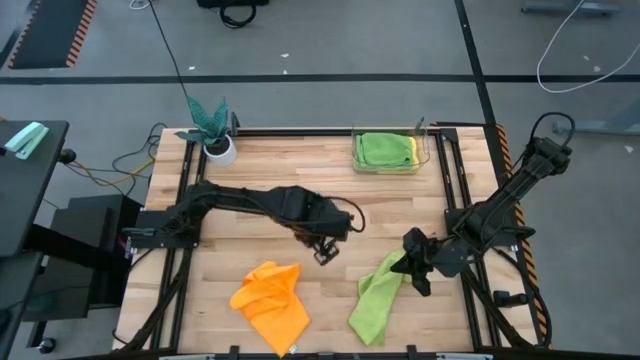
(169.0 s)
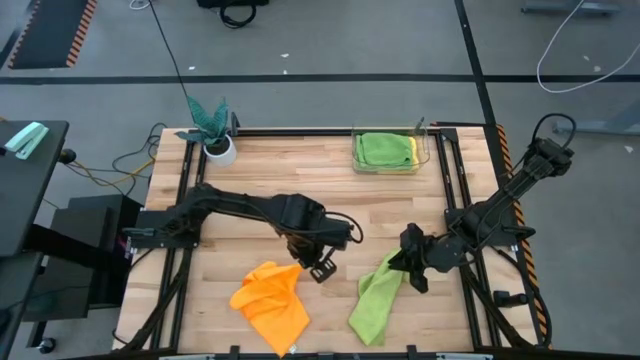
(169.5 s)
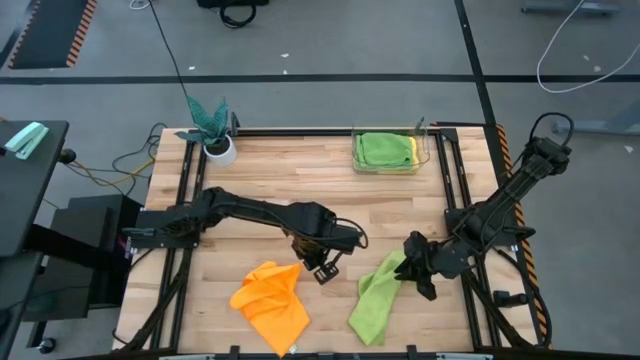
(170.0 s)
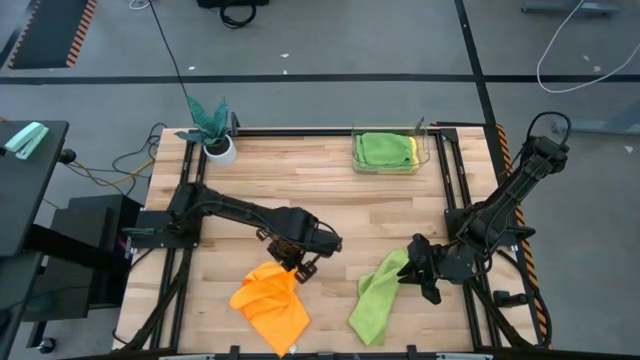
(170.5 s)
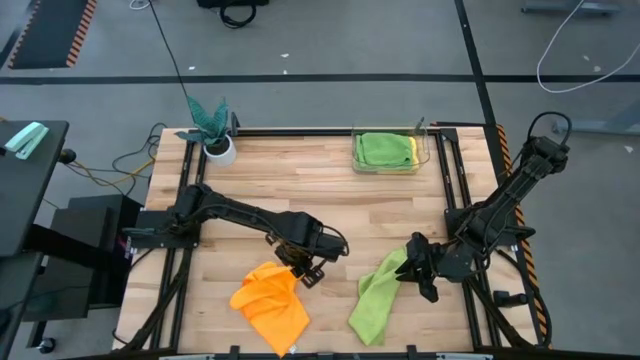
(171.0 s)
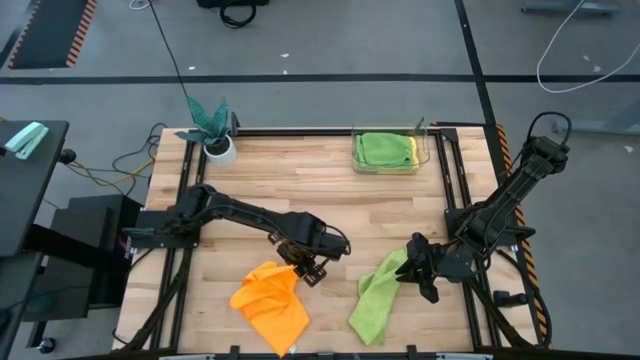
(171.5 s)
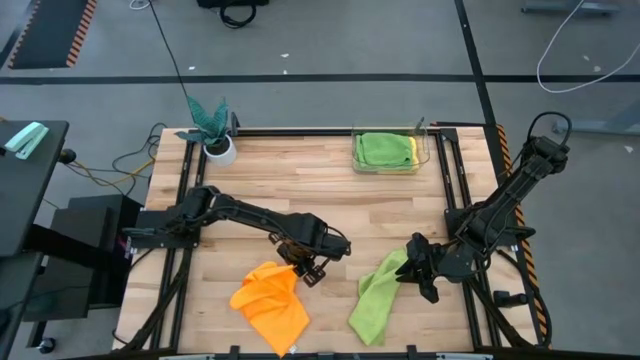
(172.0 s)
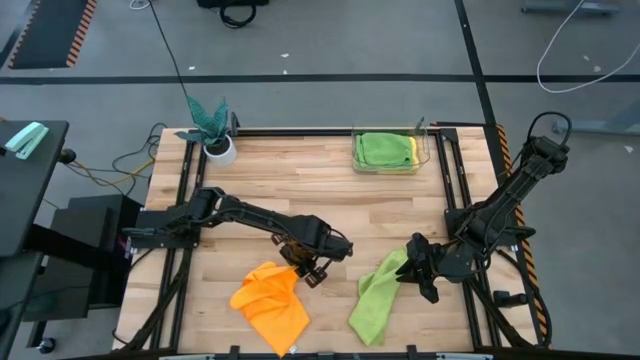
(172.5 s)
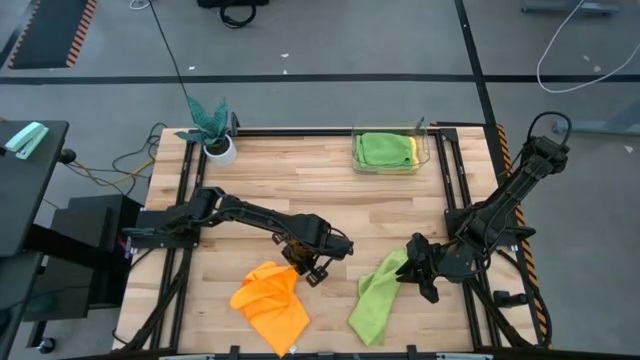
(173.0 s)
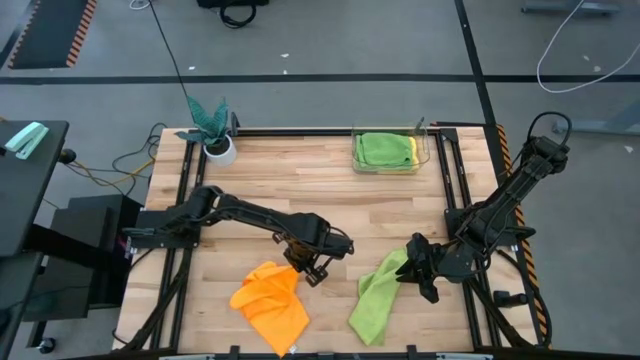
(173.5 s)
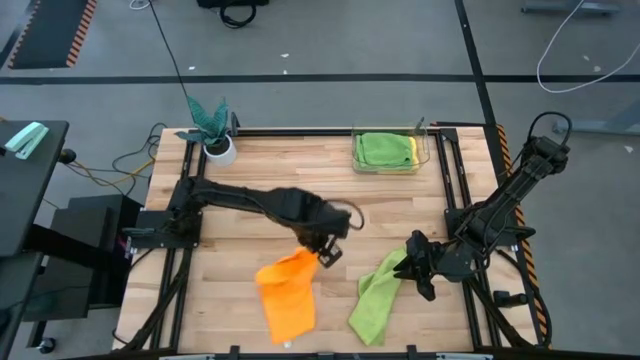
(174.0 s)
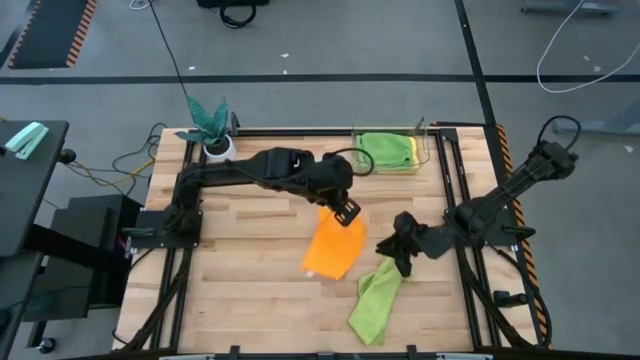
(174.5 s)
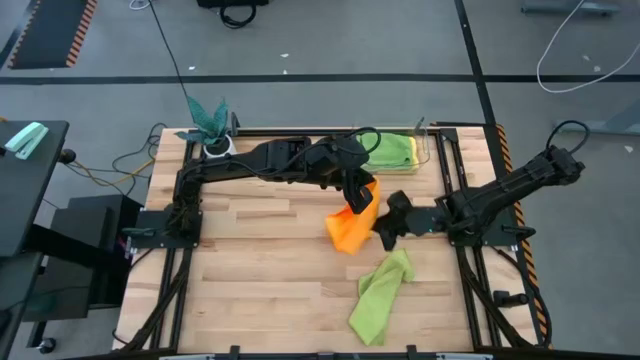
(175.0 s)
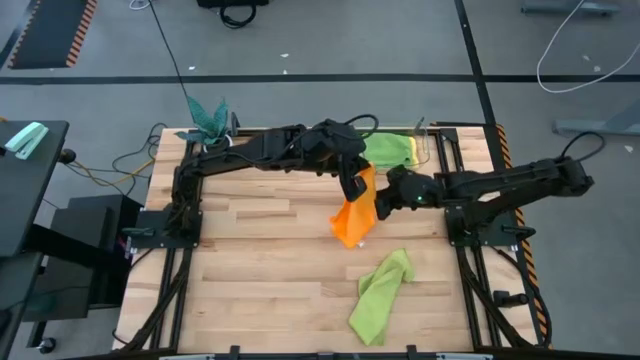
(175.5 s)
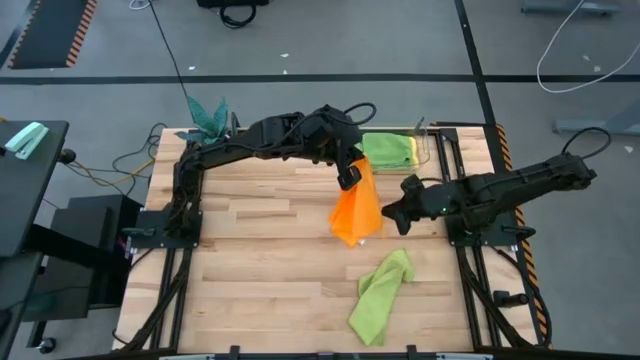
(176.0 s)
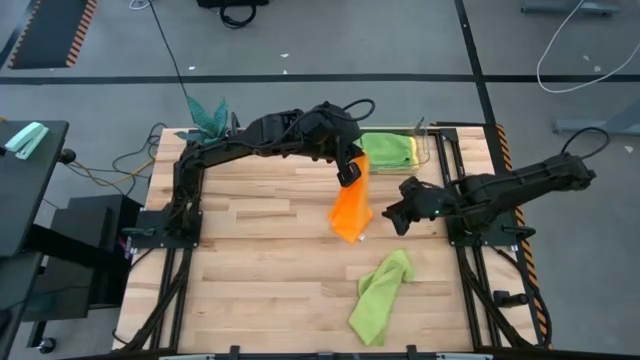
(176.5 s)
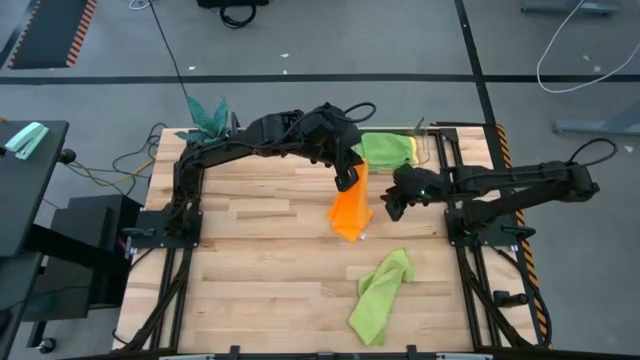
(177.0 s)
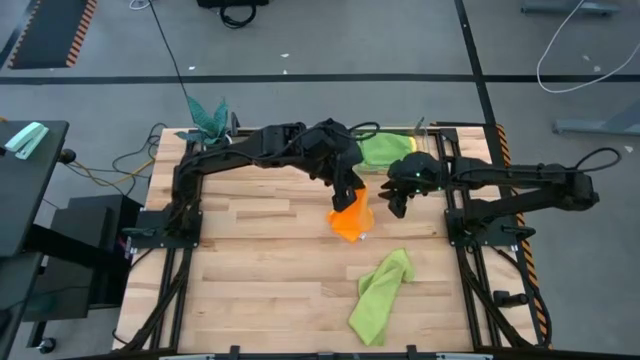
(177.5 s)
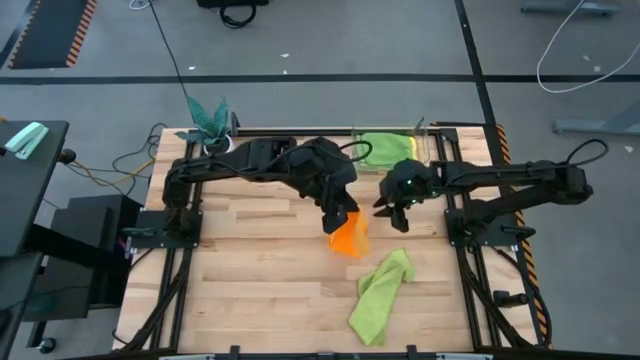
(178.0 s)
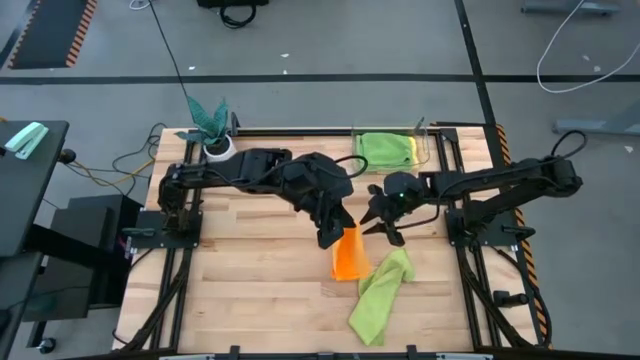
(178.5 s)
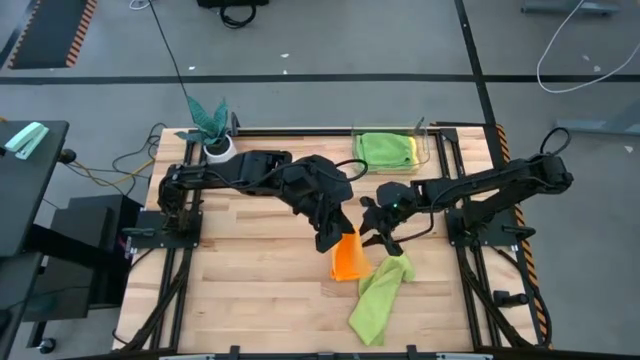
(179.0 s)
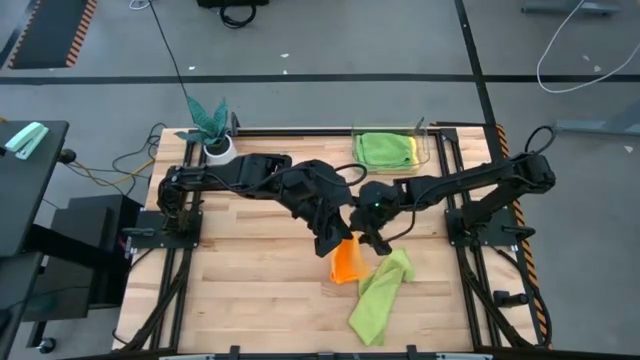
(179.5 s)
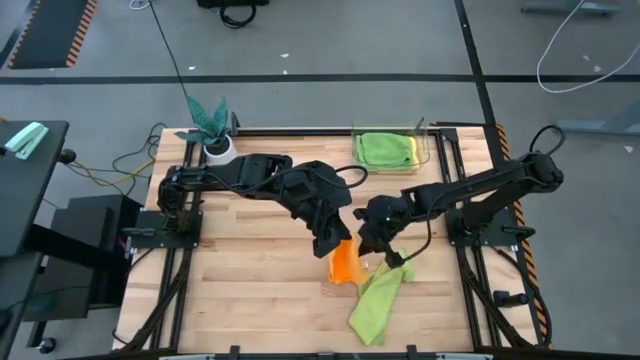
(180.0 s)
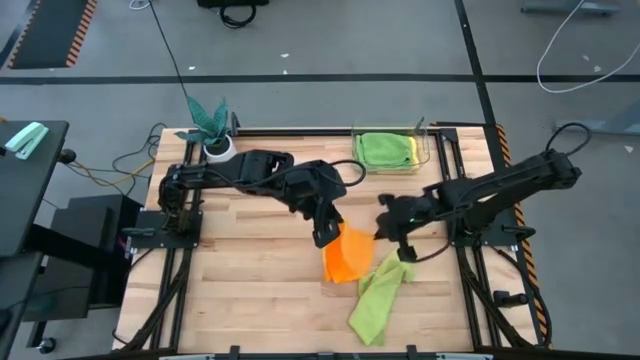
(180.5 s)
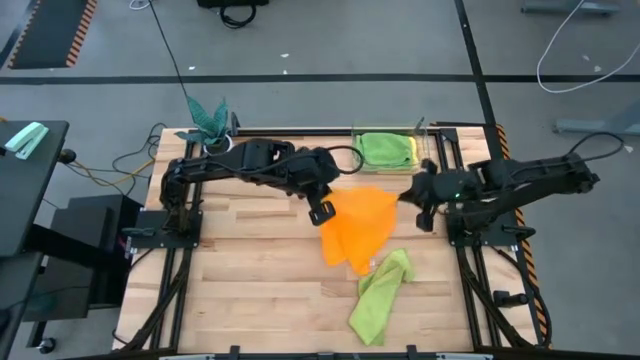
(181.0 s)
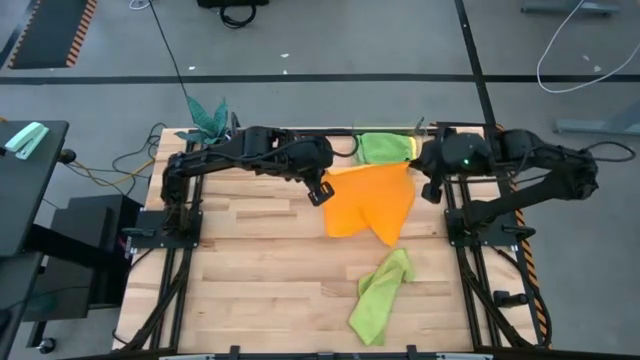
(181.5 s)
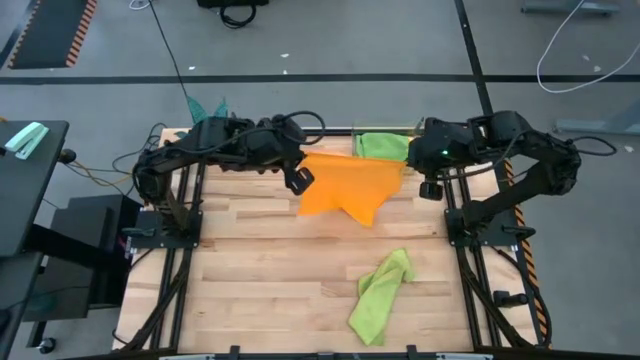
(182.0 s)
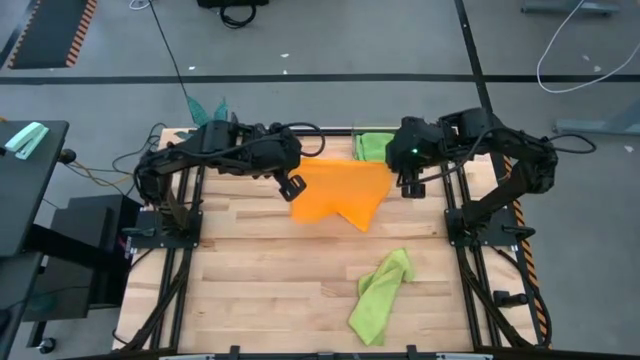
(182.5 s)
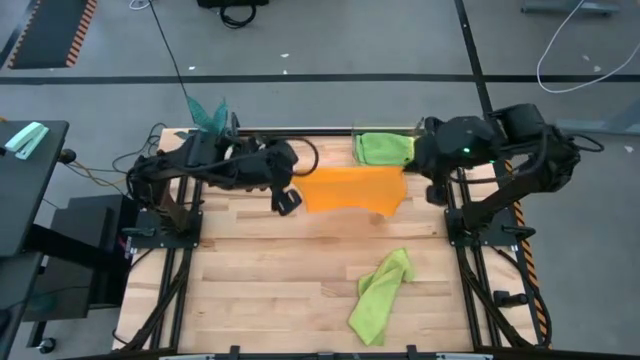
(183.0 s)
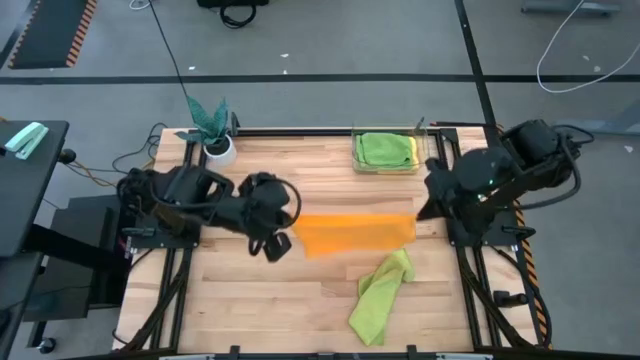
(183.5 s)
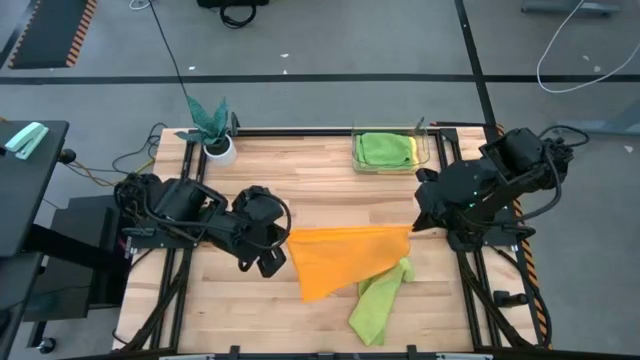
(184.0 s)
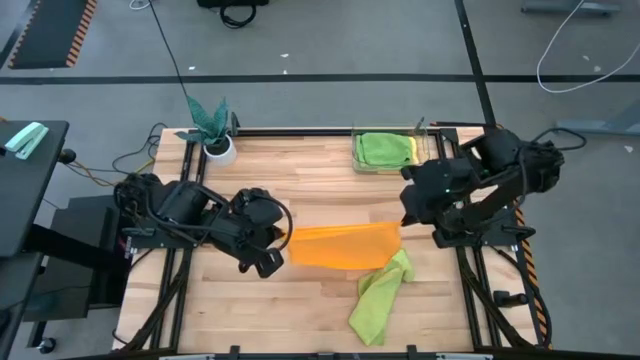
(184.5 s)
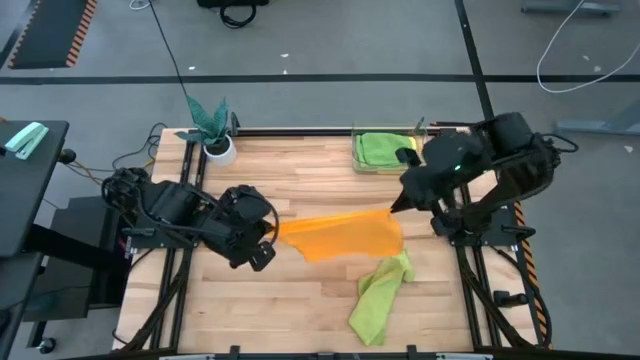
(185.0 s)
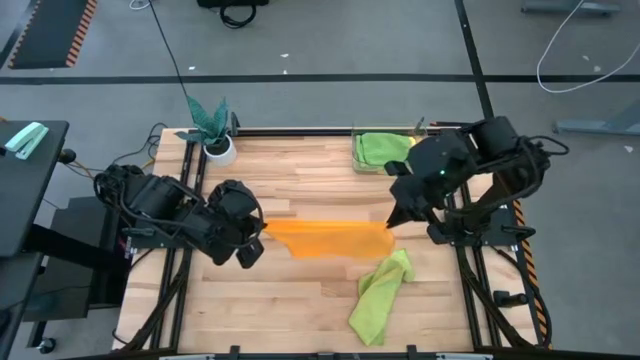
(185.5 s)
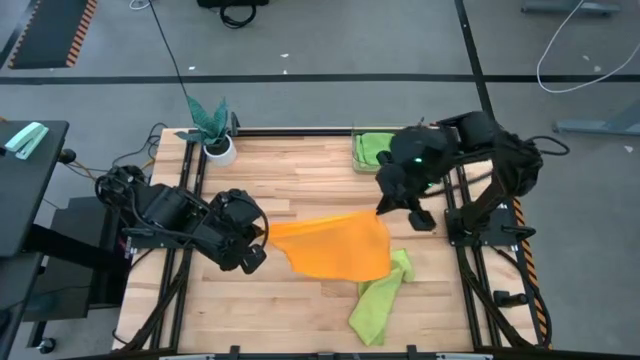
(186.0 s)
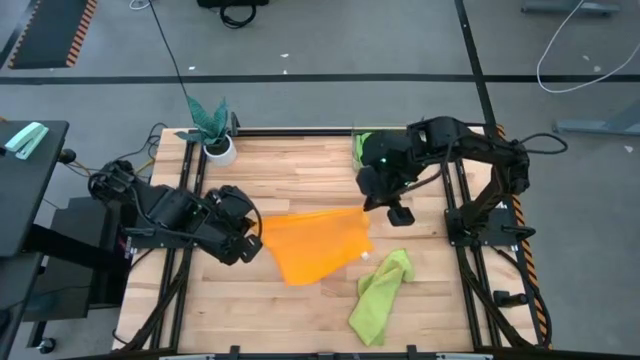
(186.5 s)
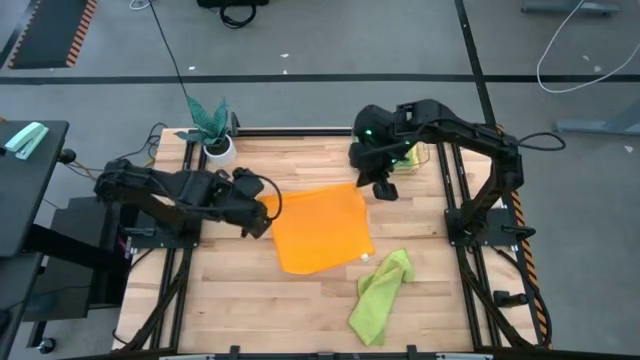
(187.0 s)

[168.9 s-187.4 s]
Task: Fold microfiber towels
Fold the orange towel

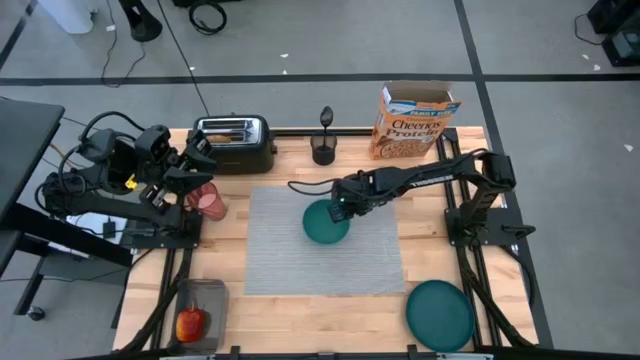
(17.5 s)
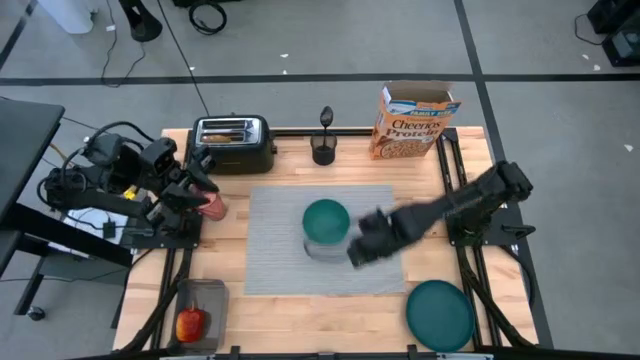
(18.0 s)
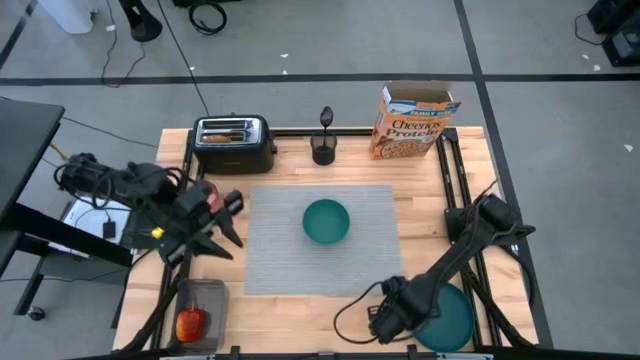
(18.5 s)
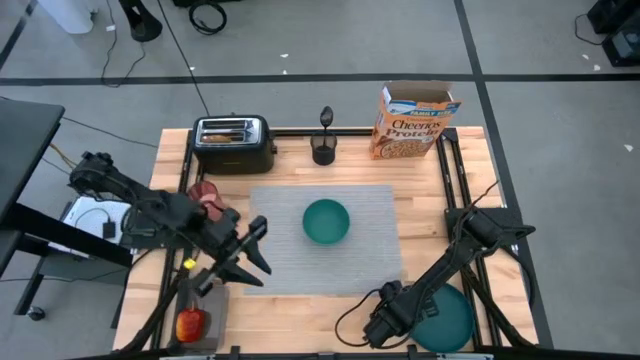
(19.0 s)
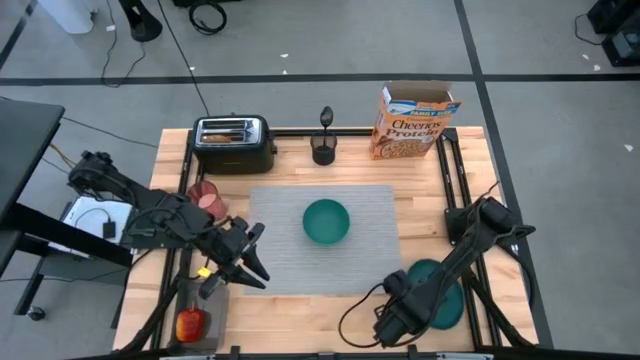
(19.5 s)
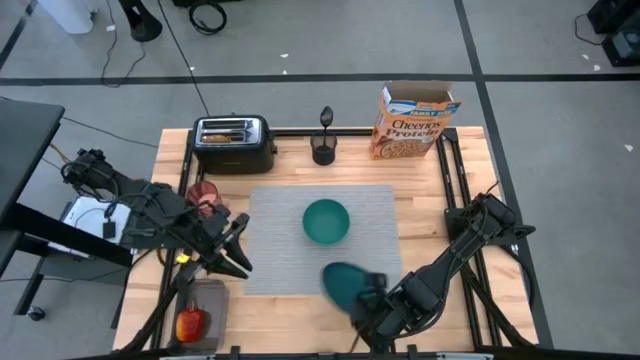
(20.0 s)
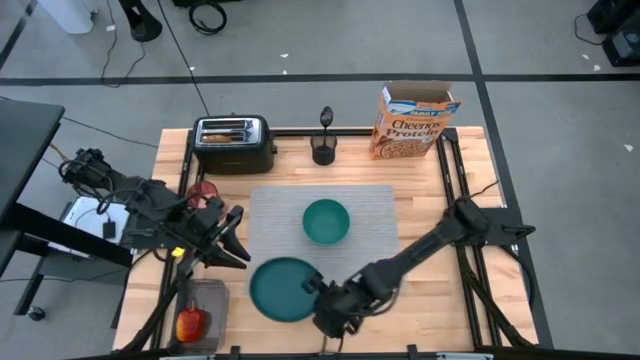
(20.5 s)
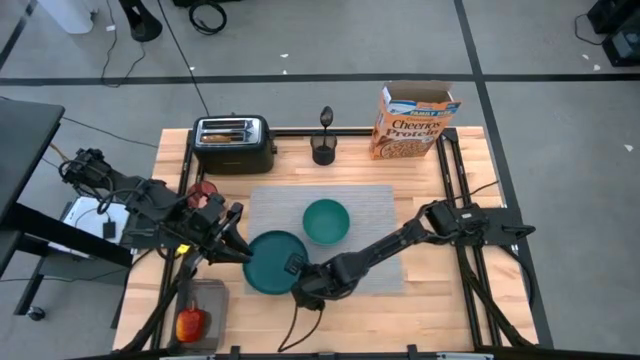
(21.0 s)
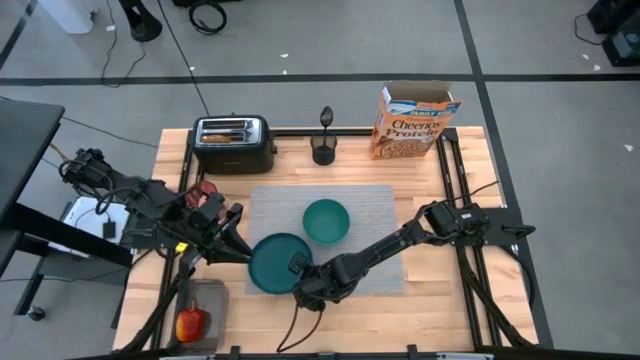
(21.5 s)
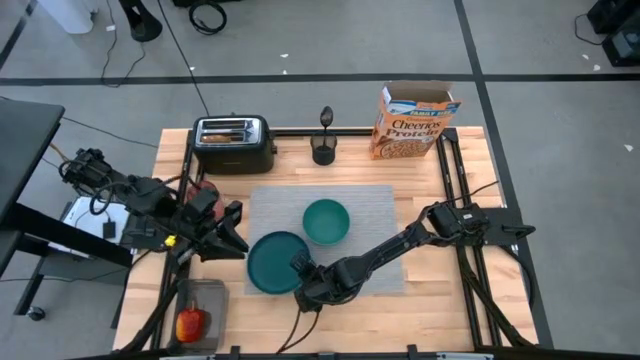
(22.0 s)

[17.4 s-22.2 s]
Task: Arrange a breakfast setting
Put the dark green plate on the gray placemat to the bottom left of the dark green bowl
